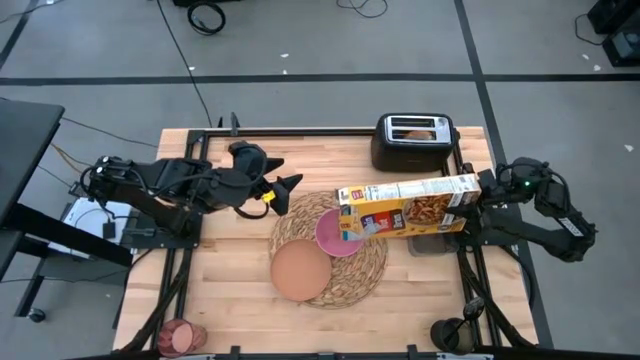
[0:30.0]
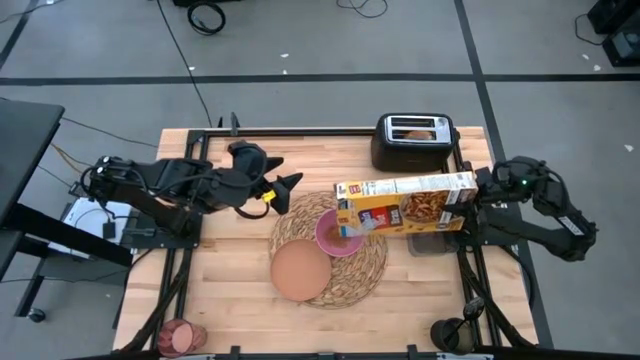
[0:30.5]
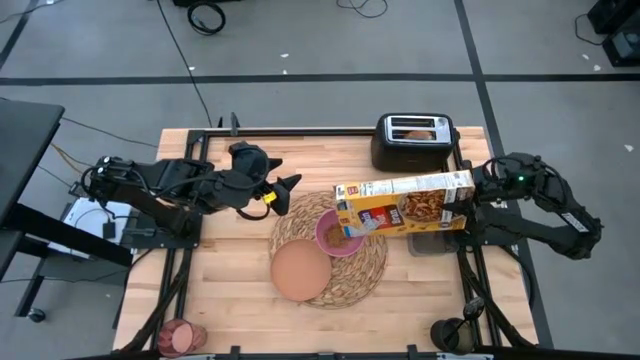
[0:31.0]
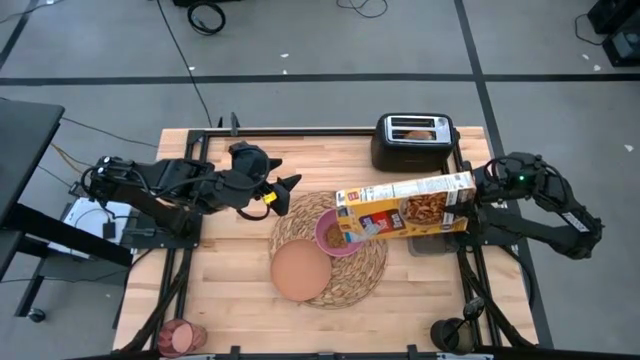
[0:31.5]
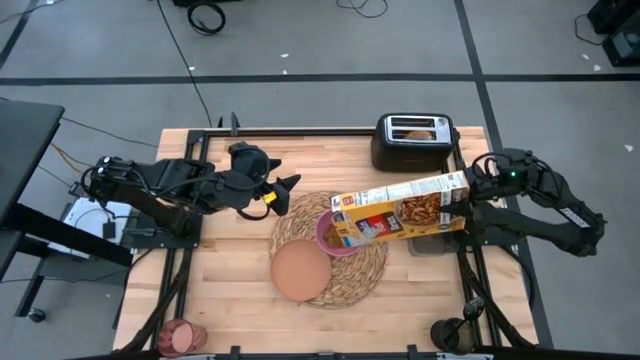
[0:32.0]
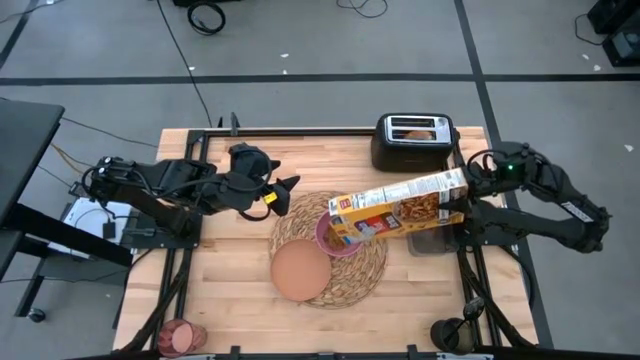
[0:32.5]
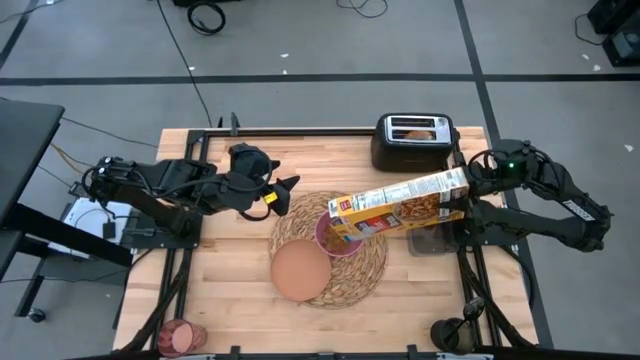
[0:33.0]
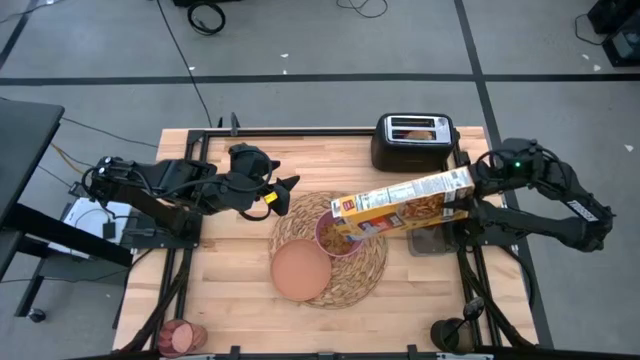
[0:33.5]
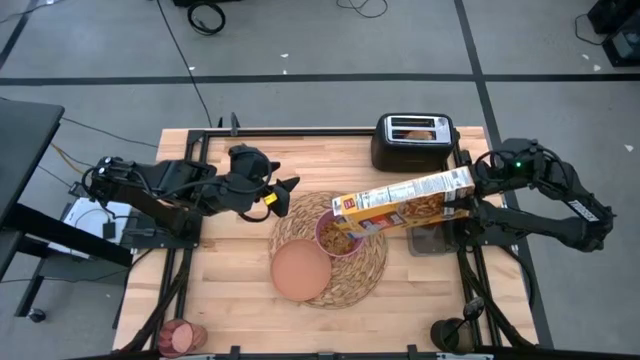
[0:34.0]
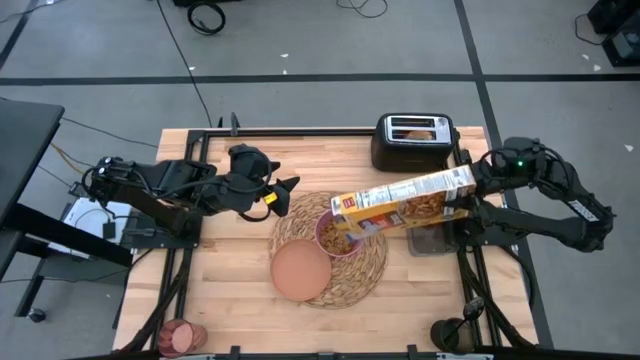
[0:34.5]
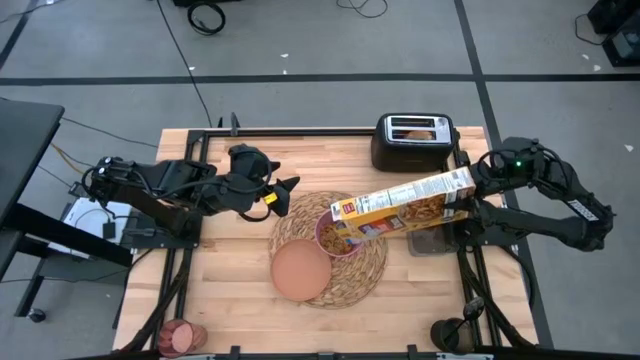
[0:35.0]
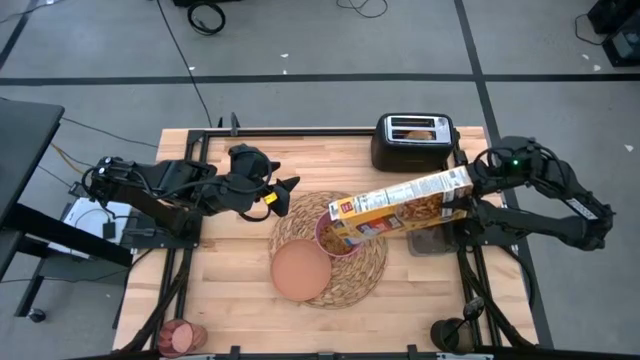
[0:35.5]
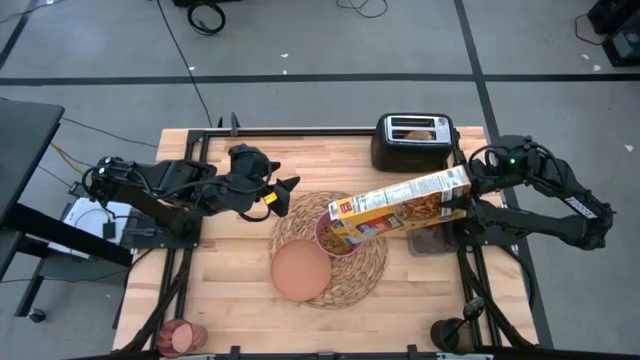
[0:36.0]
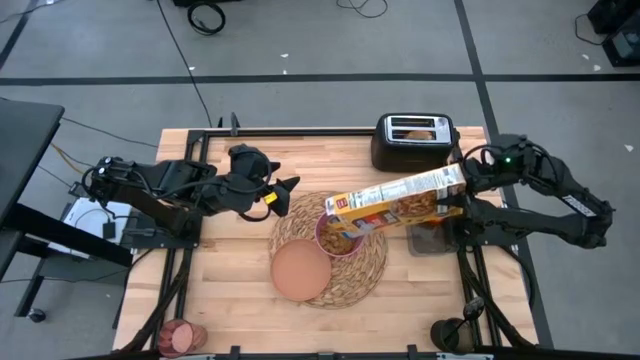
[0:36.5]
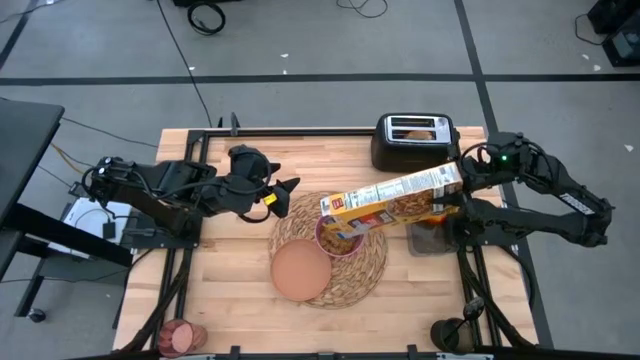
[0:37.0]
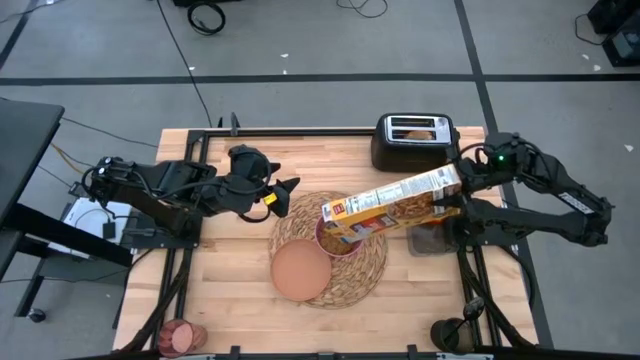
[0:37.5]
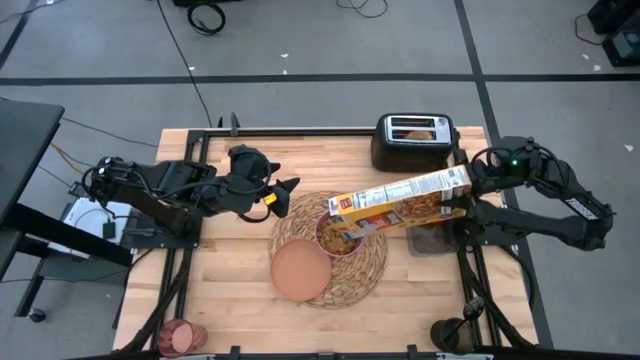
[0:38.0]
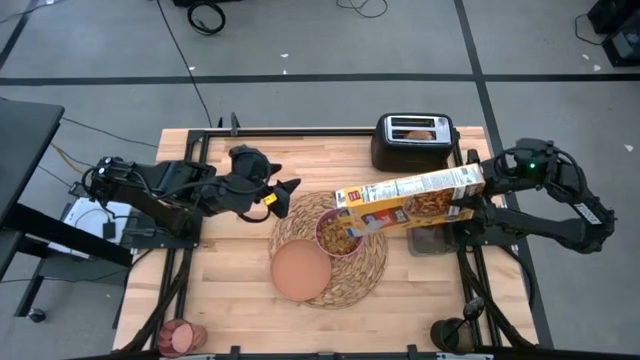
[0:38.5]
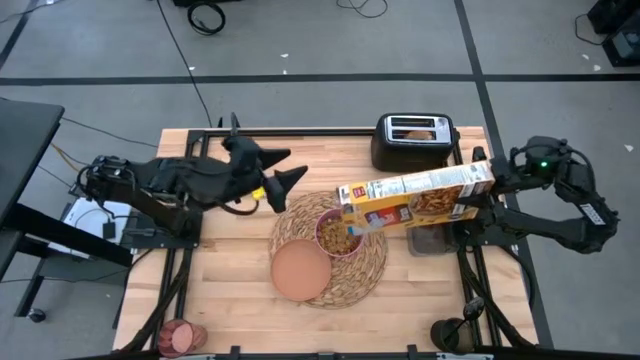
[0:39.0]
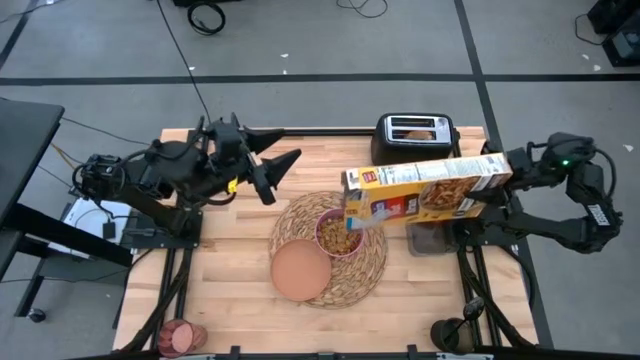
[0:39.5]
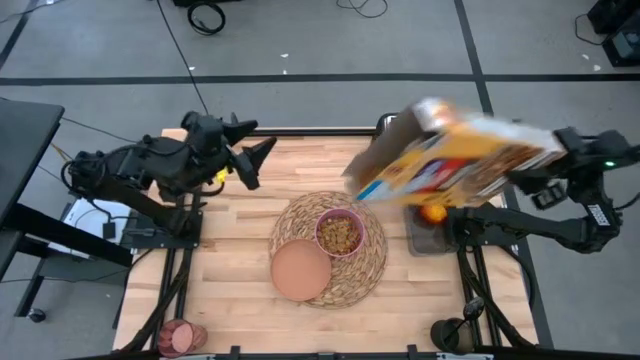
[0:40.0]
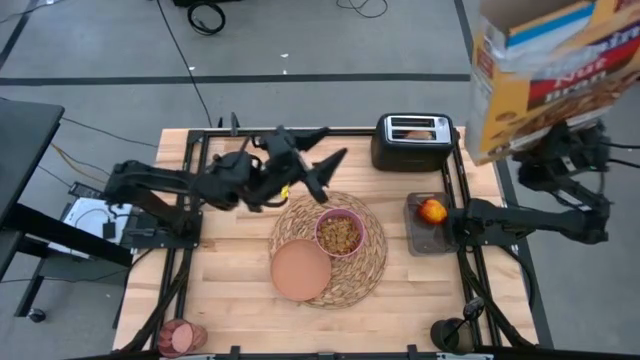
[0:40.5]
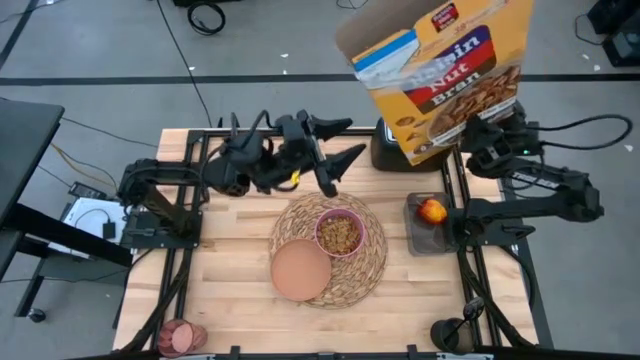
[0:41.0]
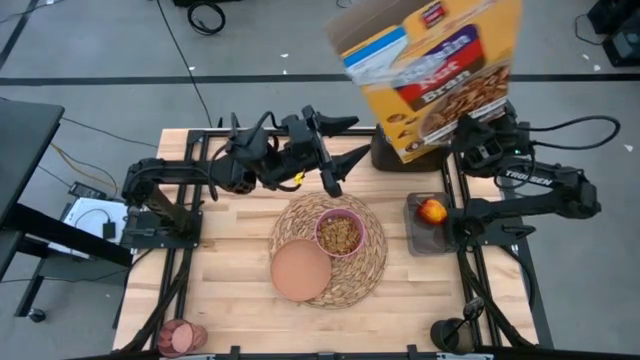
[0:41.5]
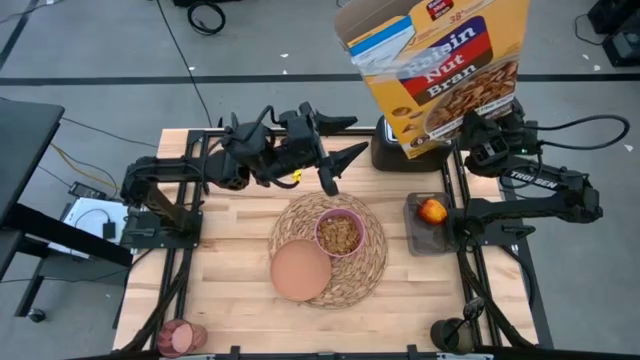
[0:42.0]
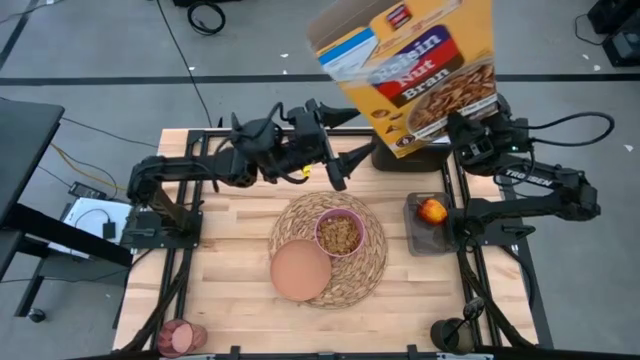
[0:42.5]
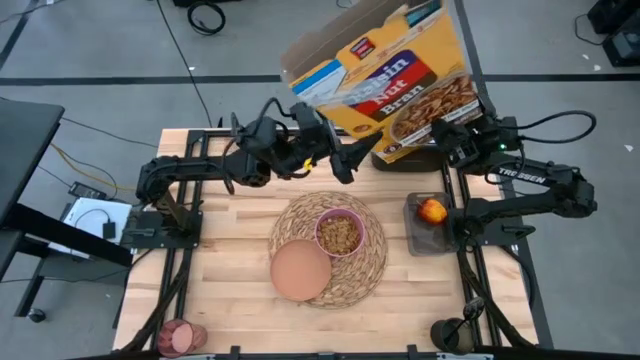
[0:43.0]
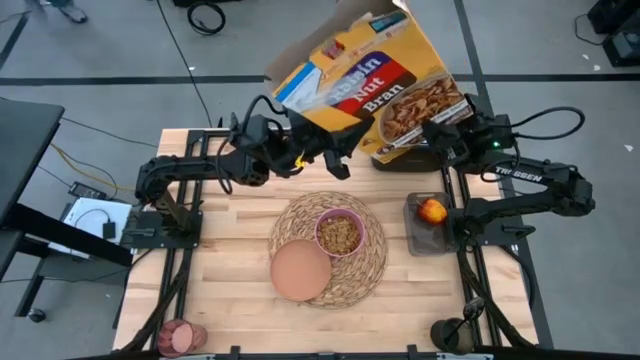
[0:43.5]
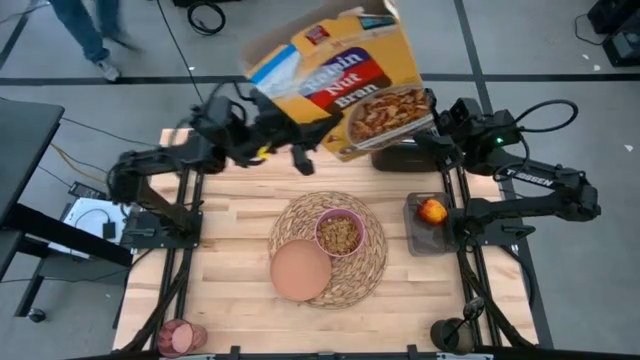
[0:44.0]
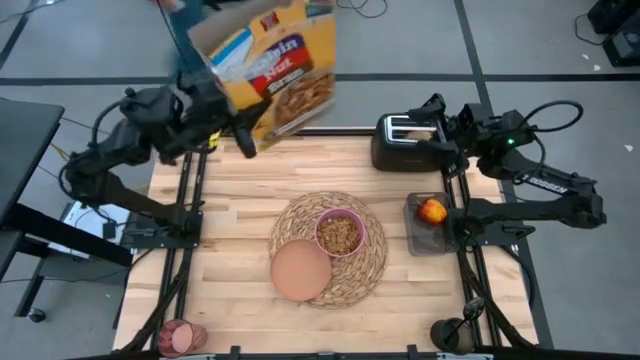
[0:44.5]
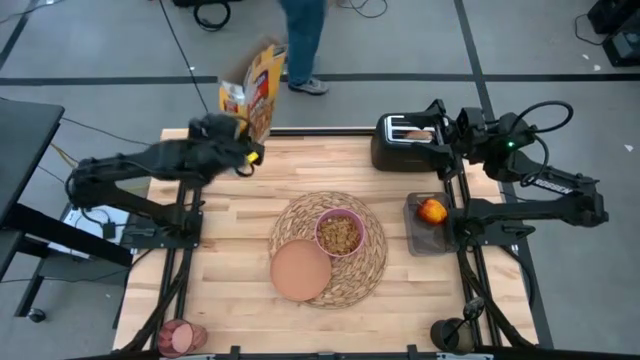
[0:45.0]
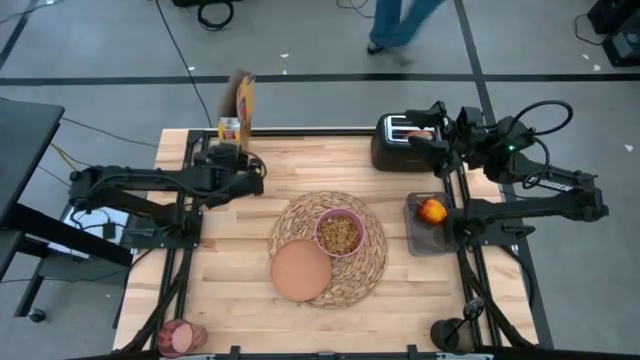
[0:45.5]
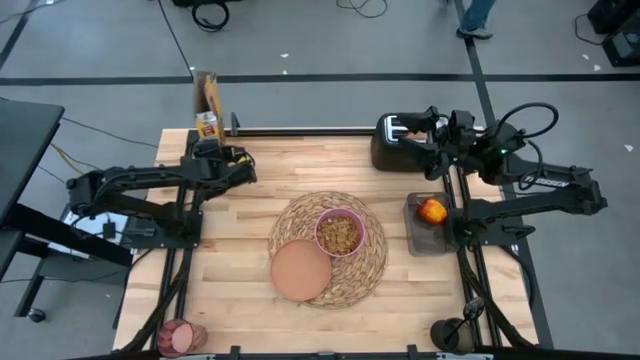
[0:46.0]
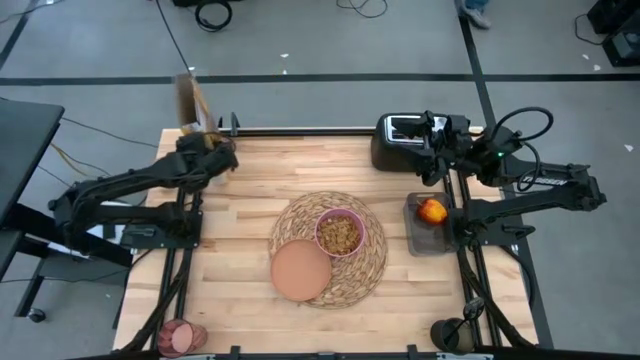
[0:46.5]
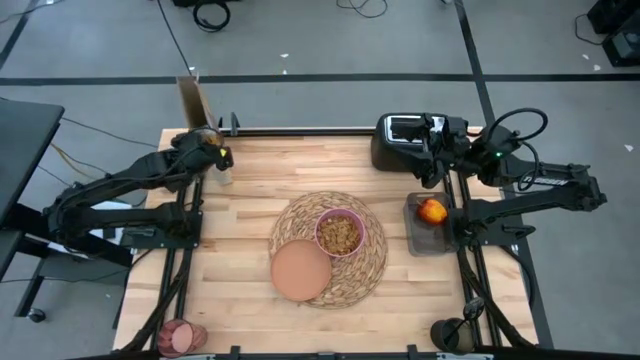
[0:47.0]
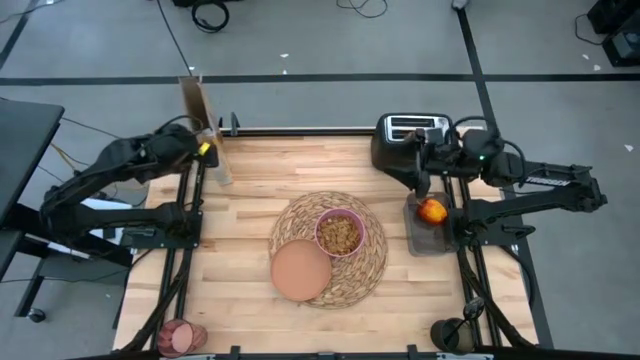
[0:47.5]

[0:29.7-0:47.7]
Task: Arrange a breakfast setting
Pour the cereal from the yellow cereal box into the pink bowl

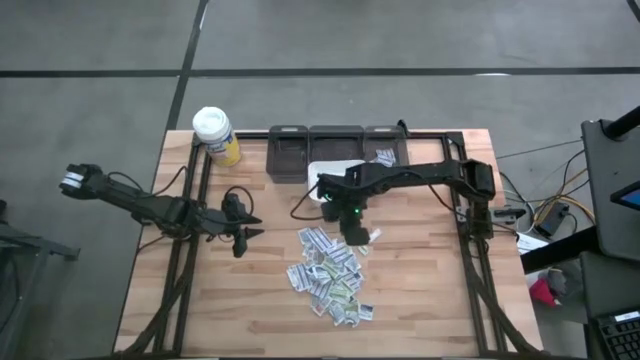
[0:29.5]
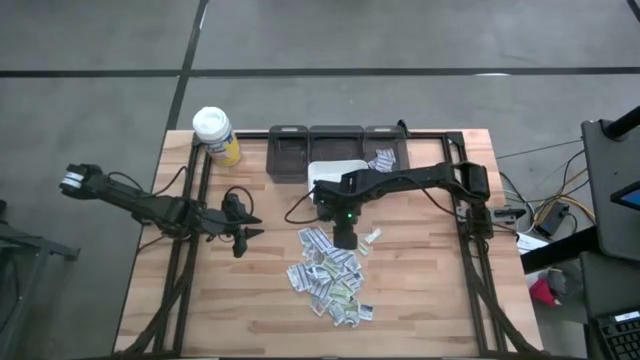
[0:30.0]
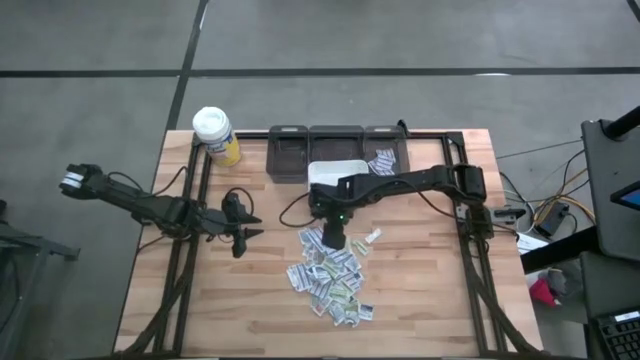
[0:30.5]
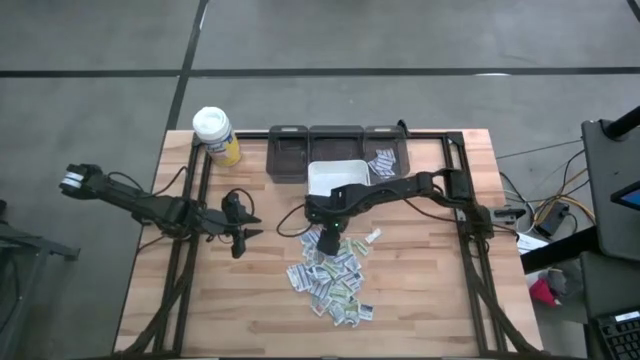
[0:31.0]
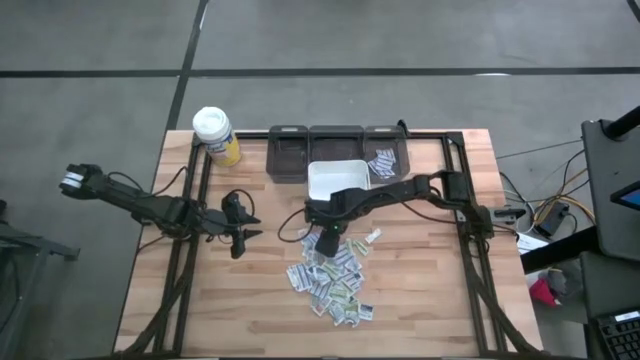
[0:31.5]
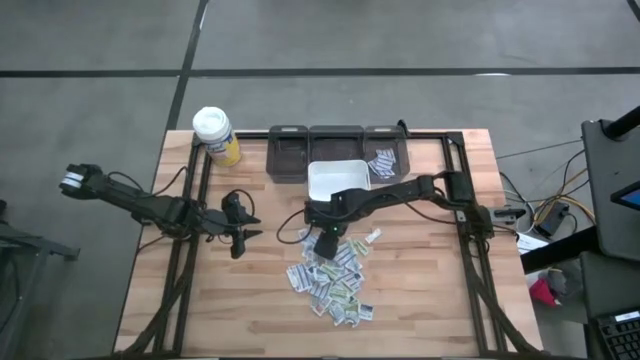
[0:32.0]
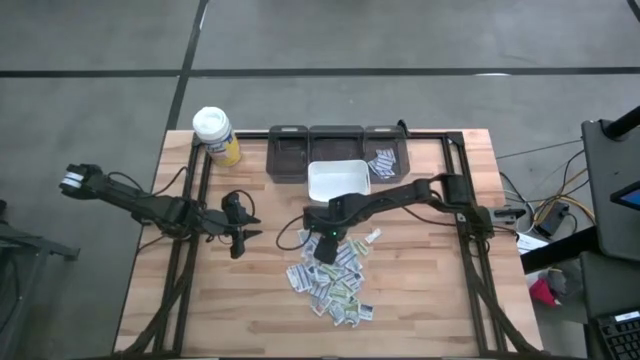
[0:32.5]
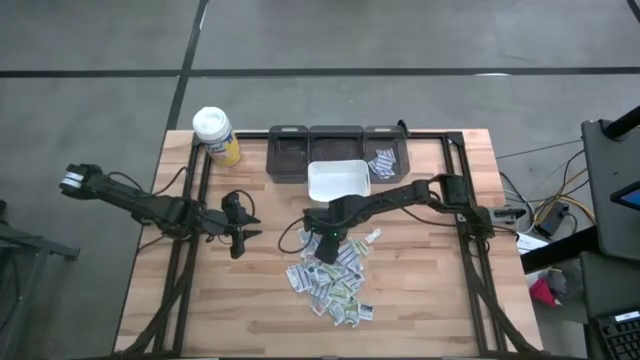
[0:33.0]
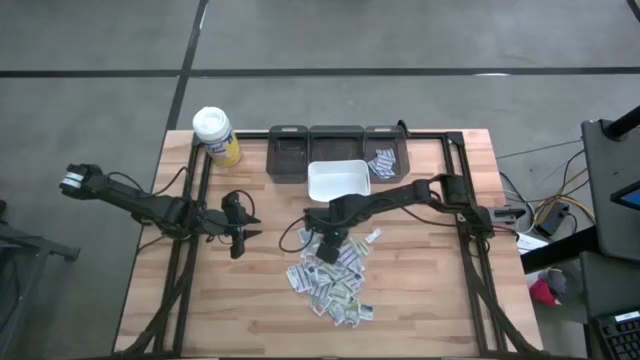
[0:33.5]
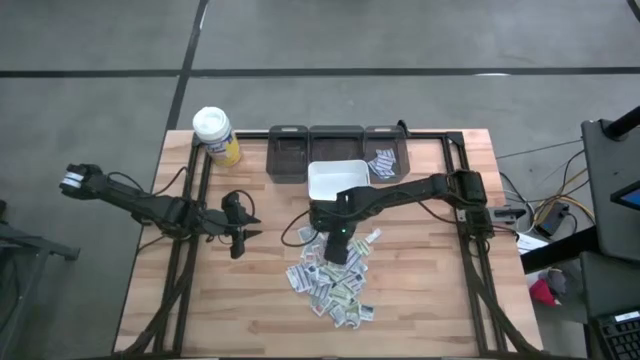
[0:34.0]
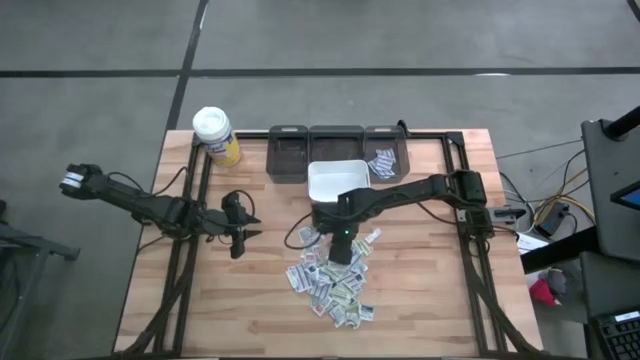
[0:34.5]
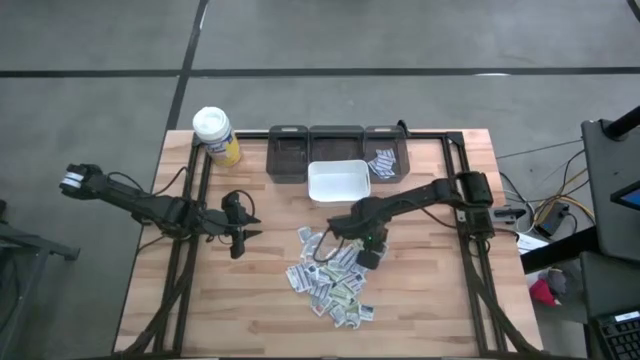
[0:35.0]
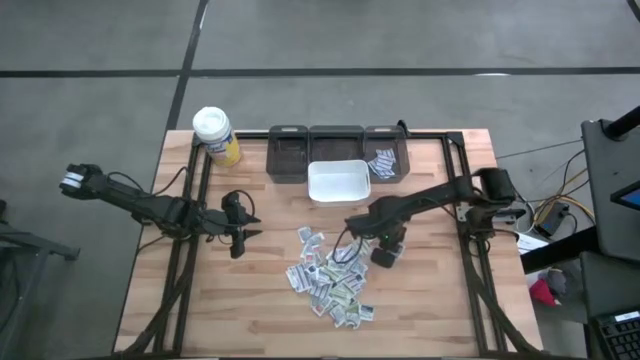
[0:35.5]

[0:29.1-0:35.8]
Task: Pick & Place First Aid Supplies
Put the blue bandage pack into the right black bin
